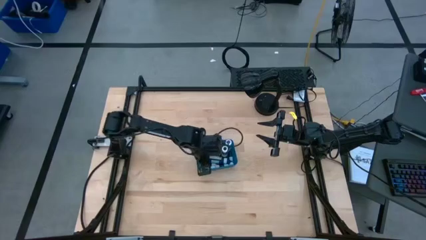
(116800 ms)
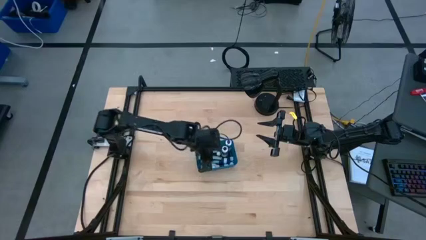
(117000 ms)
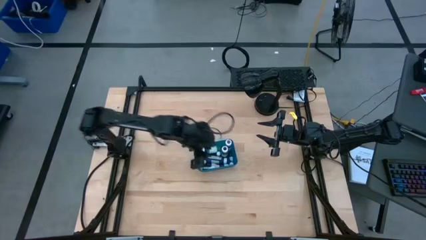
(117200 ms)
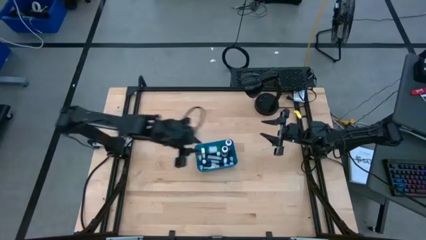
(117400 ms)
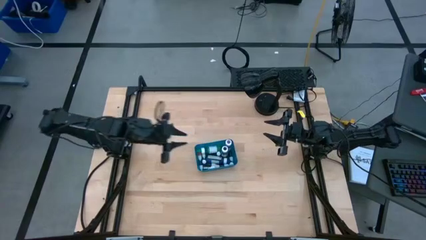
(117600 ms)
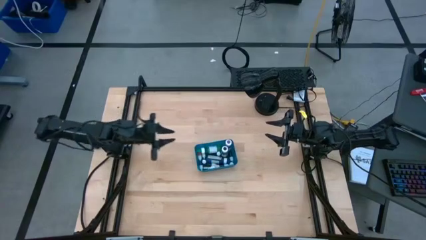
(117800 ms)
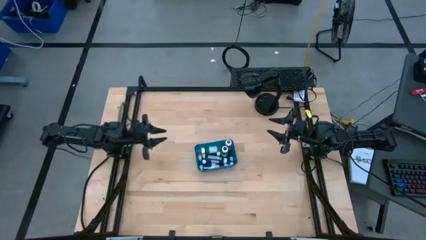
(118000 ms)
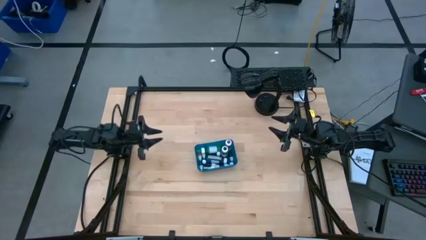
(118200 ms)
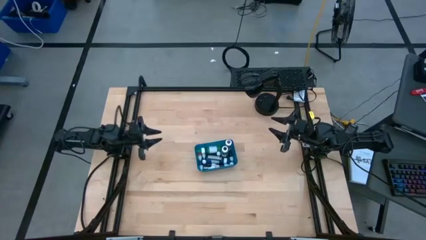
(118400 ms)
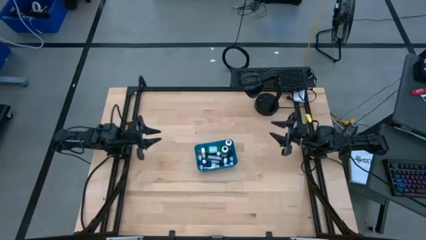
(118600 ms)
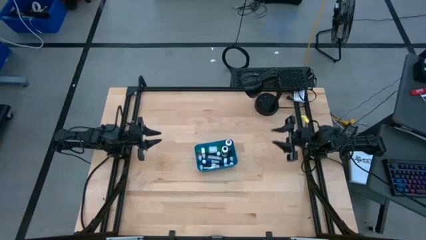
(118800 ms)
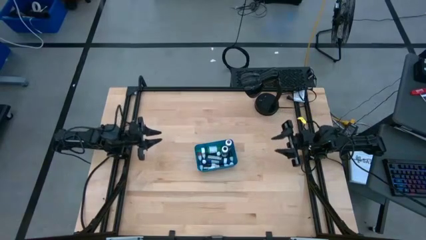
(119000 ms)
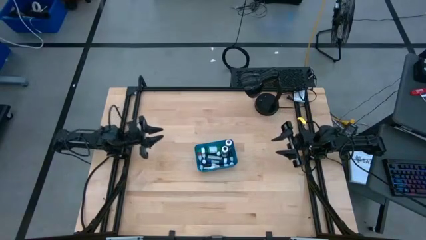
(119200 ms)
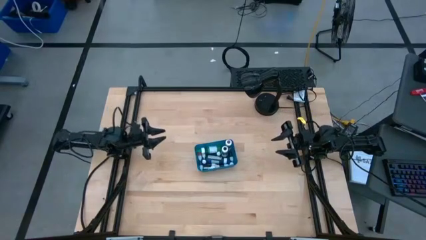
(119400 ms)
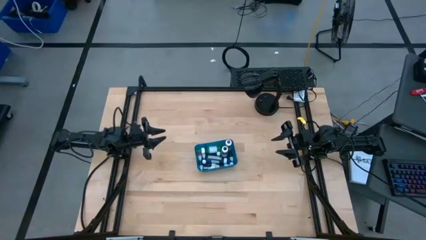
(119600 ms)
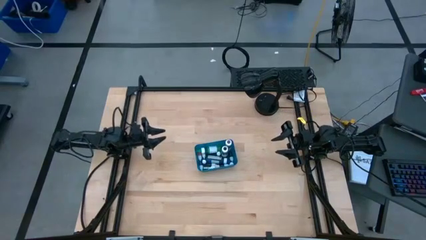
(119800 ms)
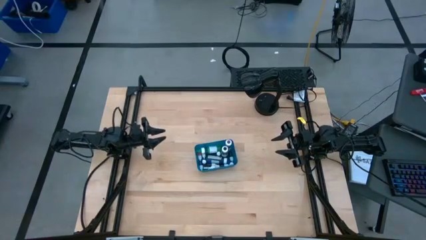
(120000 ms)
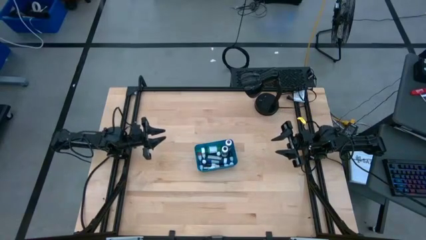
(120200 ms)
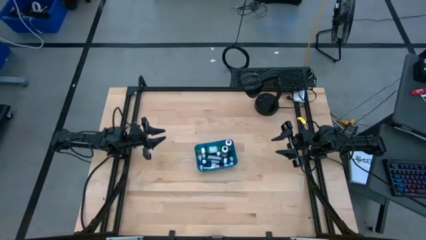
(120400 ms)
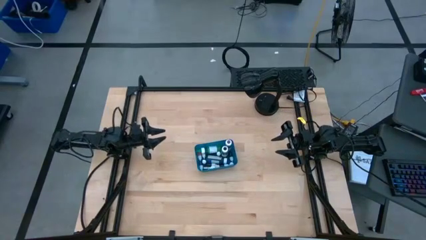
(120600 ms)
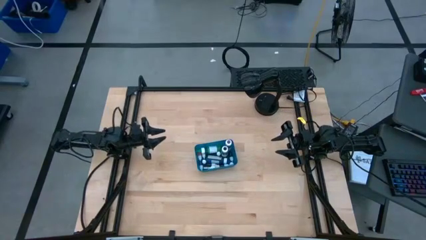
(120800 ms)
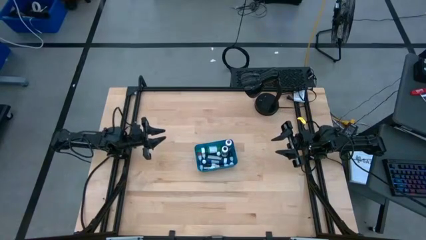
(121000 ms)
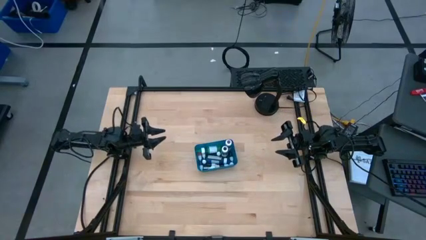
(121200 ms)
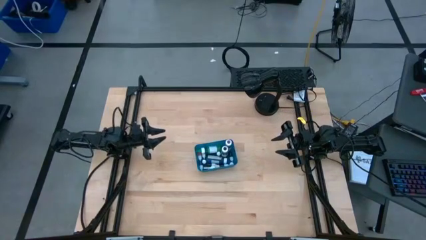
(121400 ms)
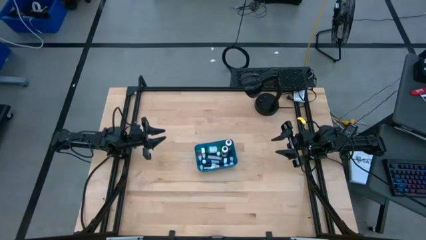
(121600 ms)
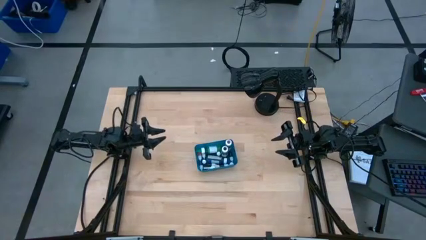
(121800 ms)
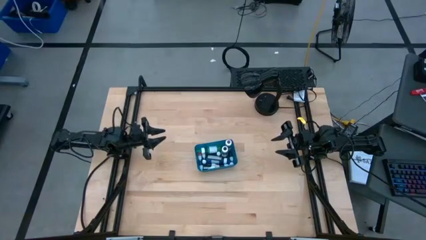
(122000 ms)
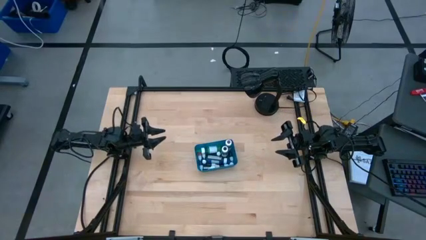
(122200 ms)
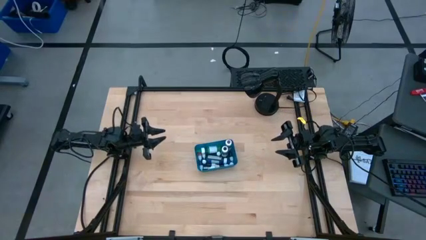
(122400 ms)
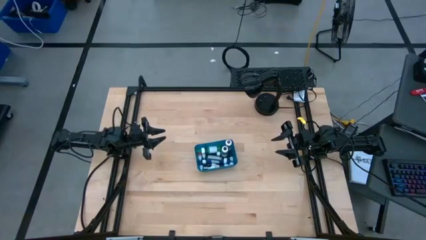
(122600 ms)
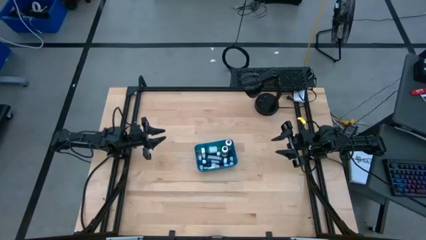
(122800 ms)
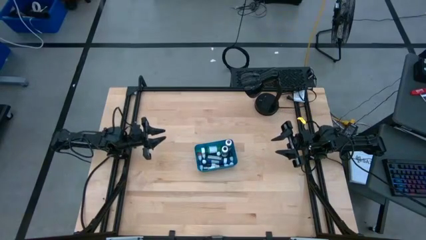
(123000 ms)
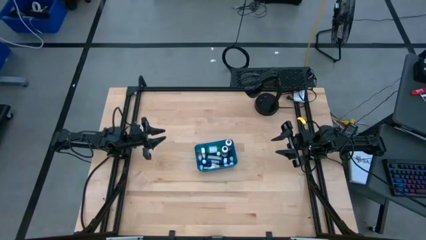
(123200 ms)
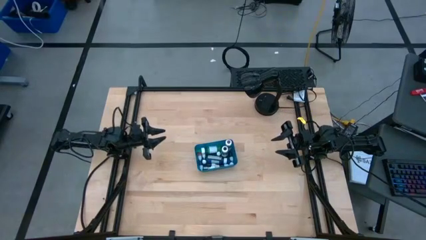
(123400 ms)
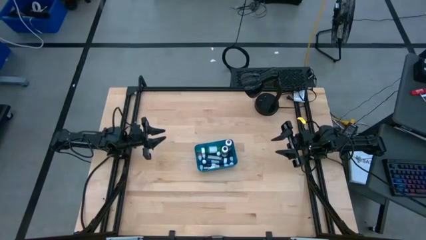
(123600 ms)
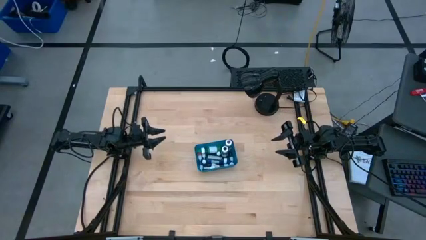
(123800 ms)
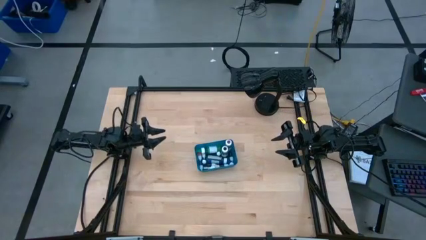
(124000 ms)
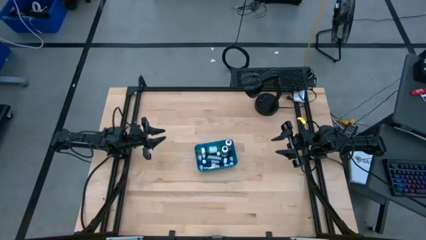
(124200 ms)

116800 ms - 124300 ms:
Task: Pick & Place food coloring
Return to Home Position

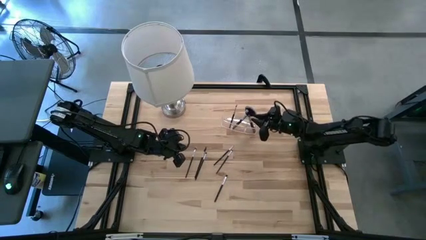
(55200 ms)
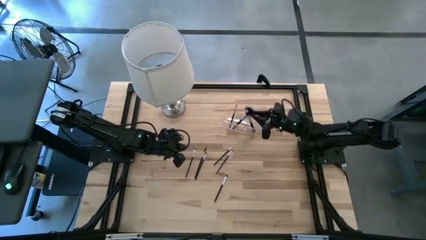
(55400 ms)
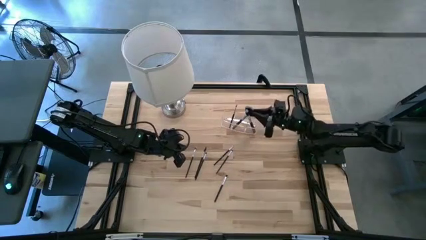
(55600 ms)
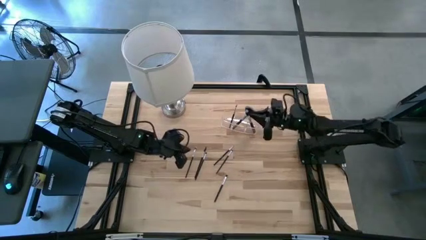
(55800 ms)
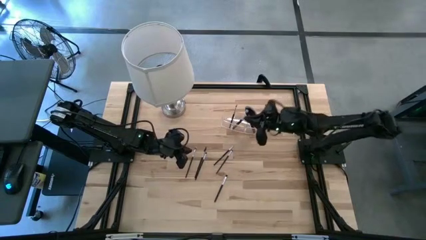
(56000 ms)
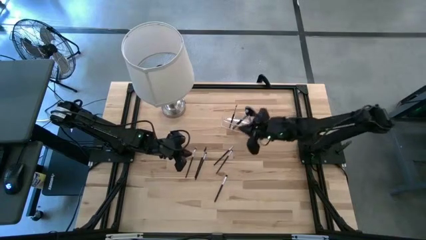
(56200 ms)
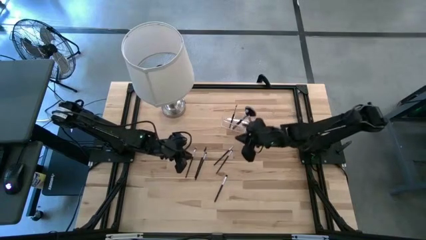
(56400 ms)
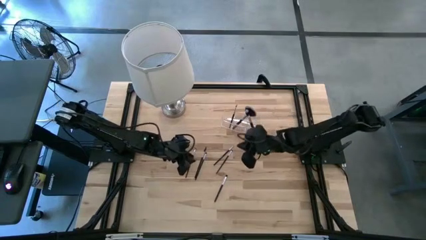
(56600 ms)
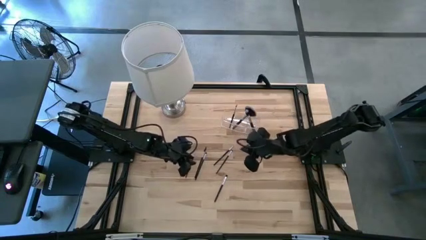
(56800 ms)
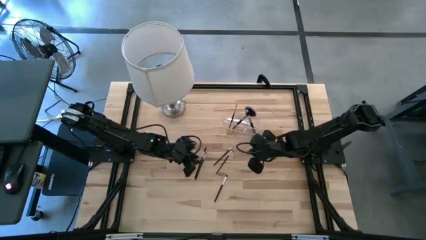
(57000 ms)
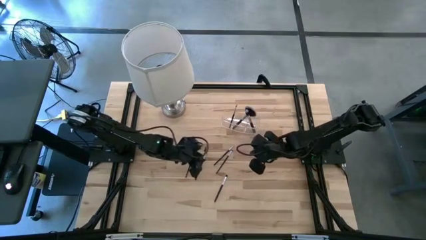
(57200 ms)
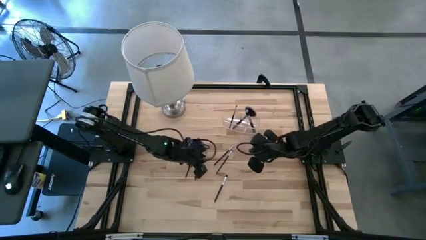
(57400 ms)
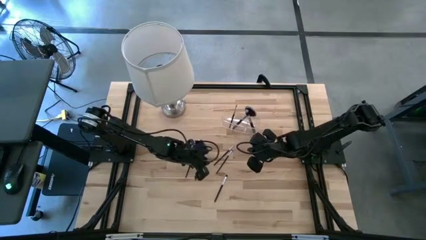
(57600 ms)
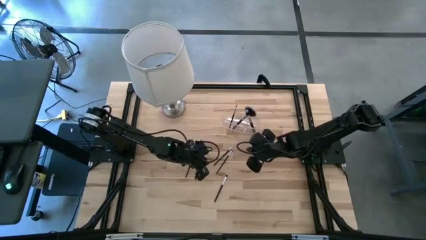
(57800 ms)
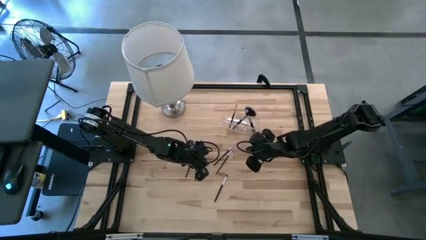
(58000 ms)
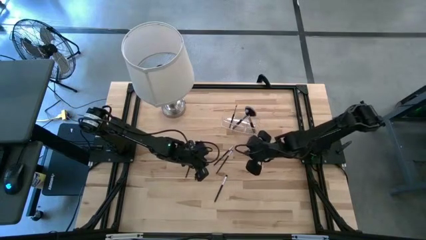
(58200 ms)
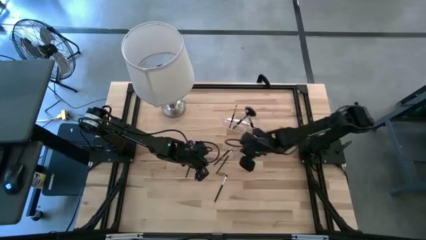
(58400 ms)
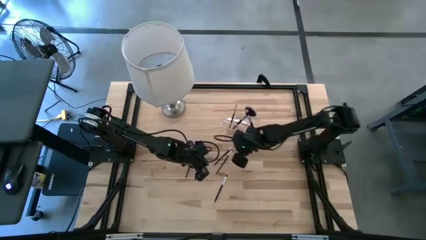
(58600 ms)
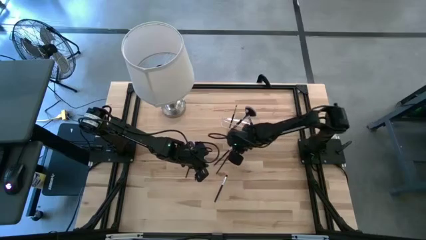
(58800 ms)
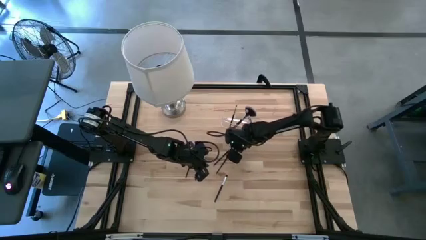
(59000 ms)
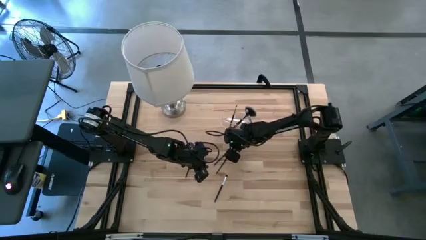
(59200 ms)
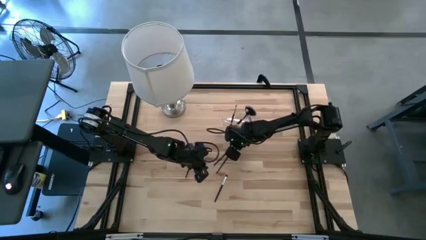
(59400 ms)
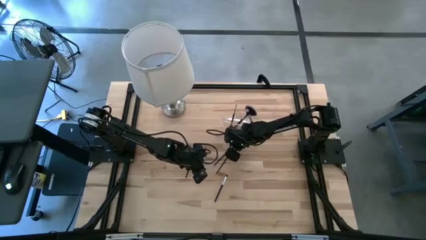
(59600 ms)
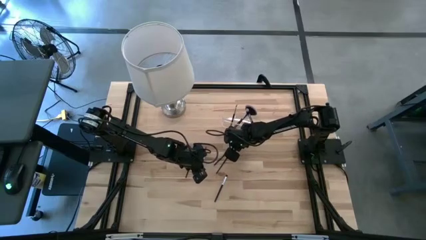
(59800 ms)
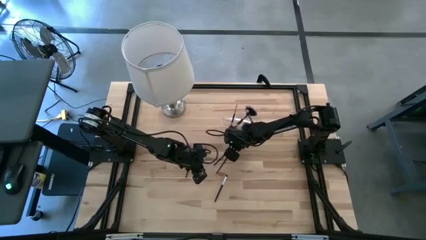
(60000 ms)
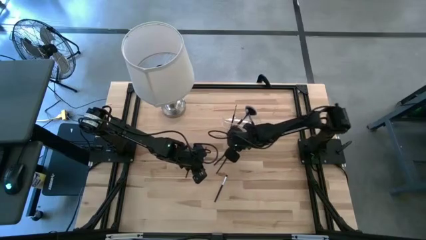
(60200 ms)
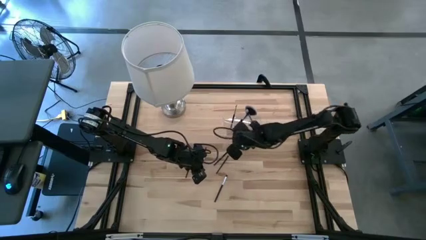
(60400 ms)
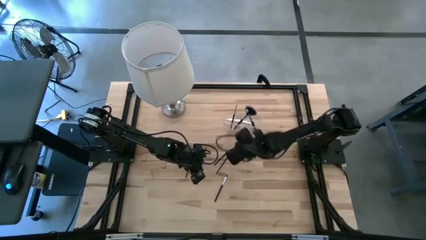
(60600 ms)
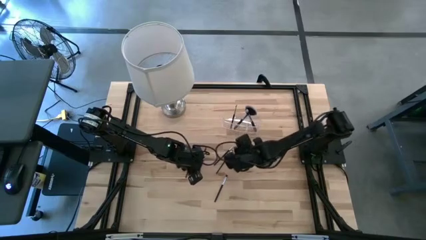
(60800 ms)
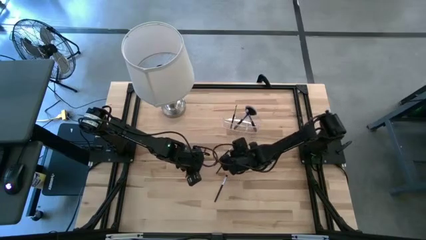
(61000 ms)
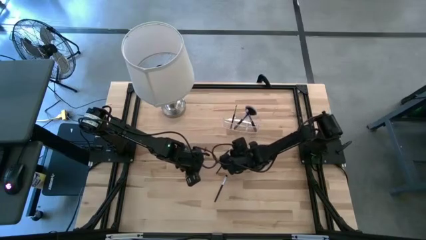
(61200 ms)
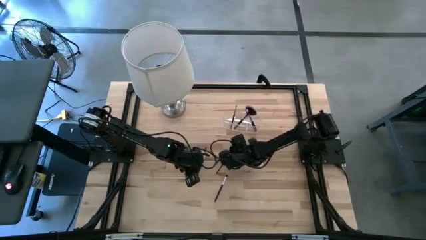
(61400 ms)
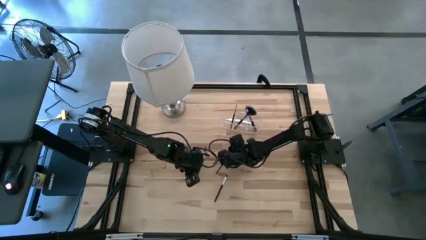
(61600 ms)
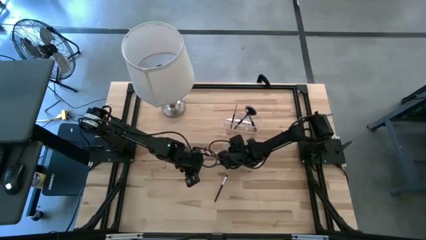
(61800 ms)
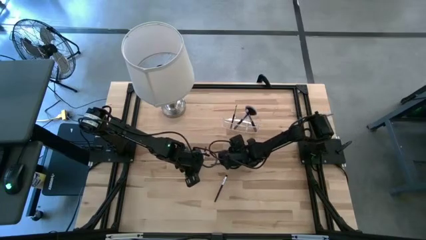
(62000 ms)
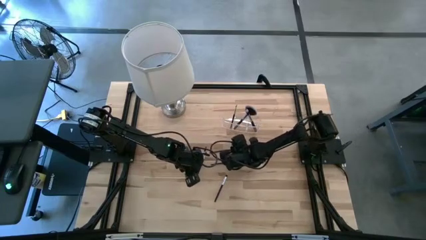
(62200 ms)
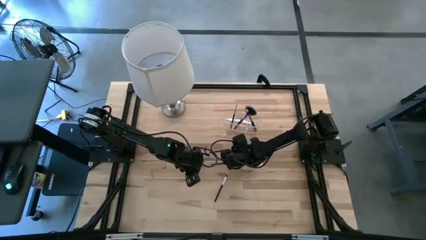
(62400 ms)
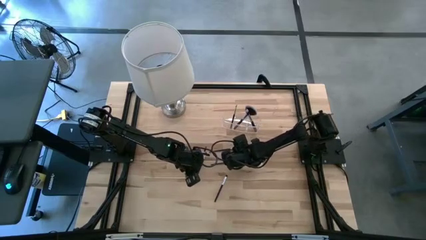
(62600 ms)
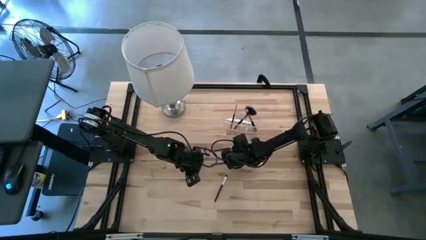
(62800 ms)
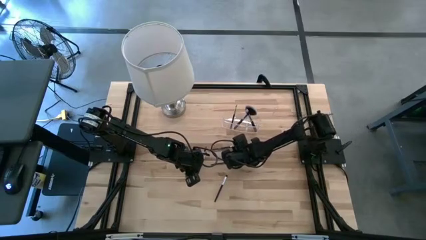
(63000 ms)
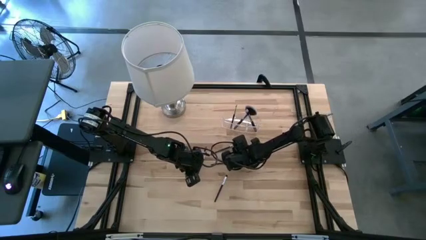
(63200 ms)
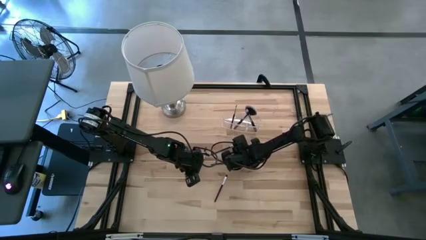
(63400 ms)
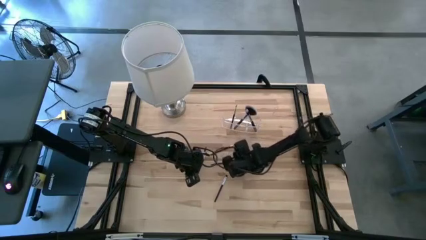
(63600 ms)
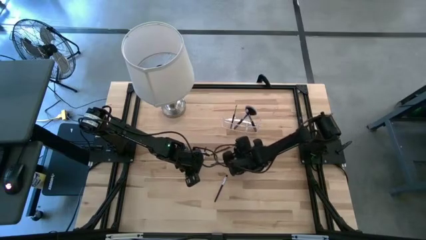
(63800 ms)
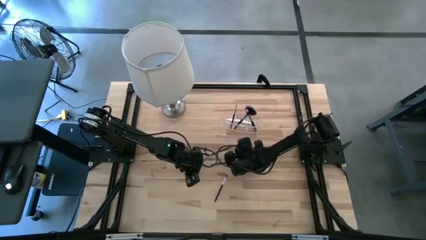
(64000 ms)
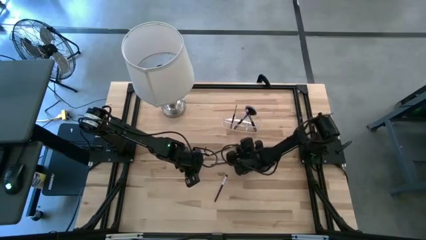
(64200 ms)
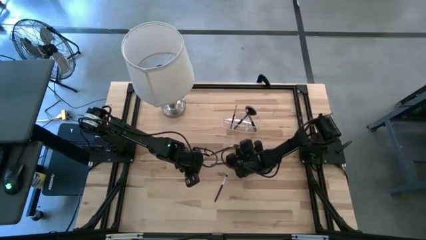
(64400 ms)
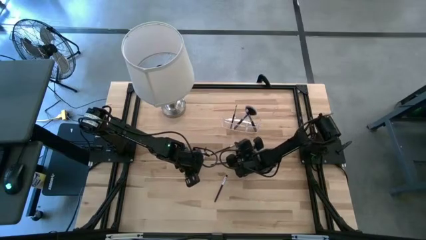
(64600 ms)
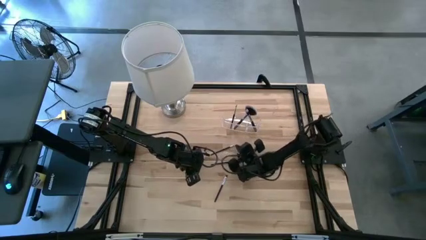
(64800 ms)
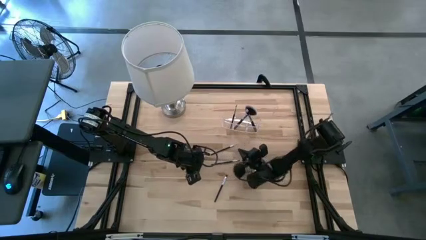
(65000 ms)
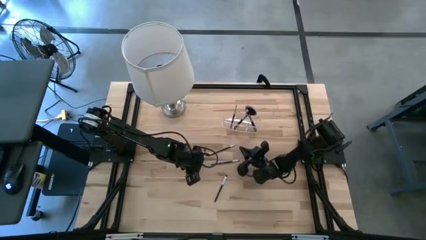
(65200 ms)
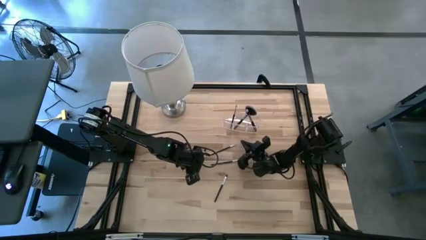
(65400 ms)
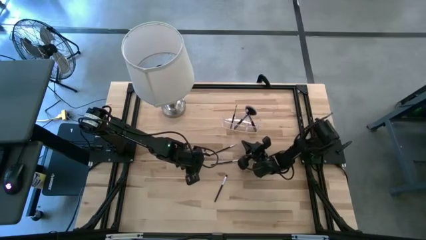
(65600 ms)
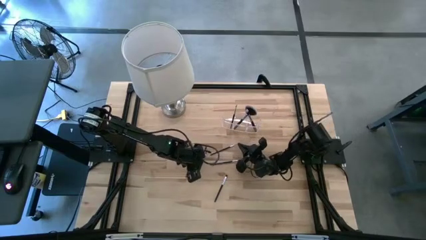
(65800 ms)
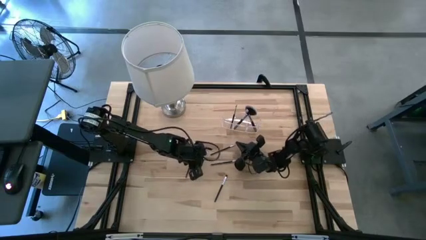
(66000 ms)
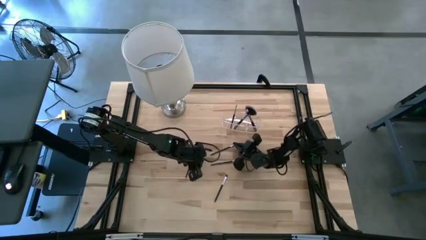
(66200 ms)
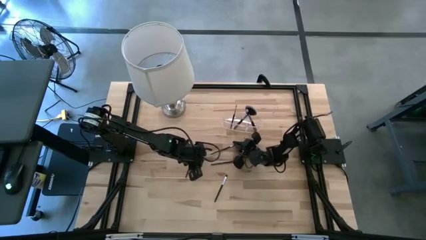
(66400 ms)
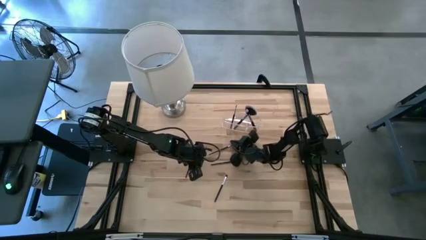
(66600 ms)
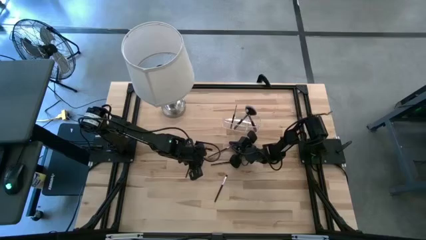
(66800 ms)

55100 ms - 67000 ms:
Task: Pick & Place Makeup Supplies
Put the makeup brush into the transparent organizer
